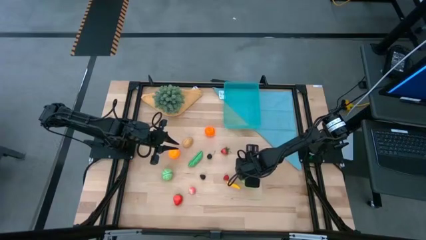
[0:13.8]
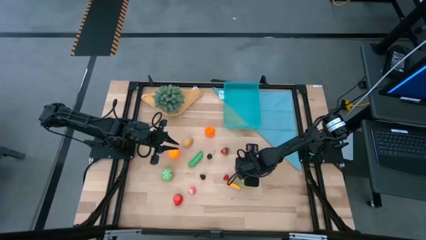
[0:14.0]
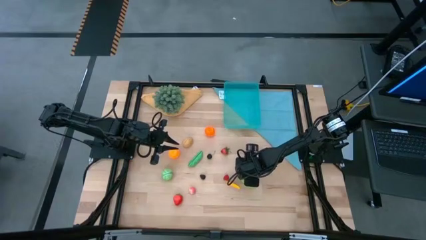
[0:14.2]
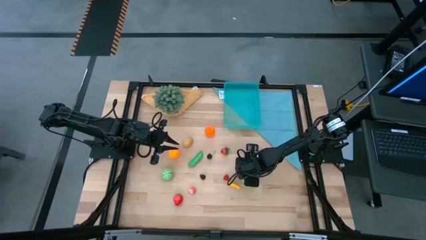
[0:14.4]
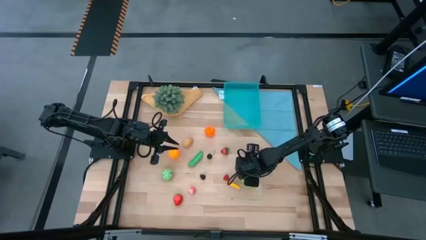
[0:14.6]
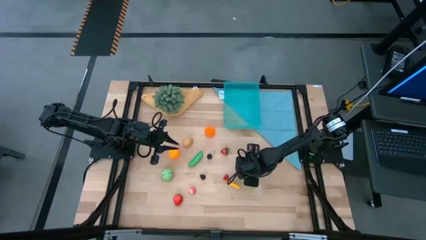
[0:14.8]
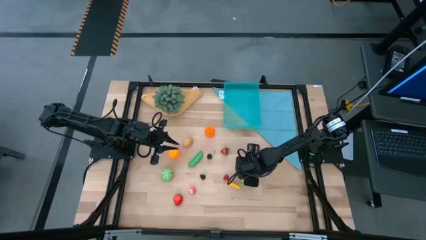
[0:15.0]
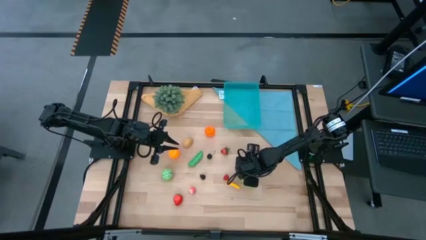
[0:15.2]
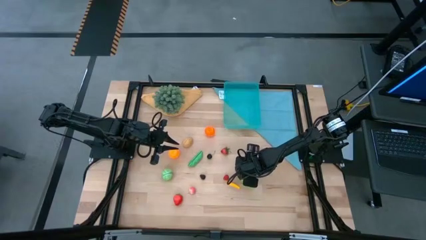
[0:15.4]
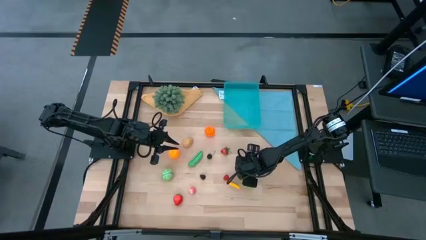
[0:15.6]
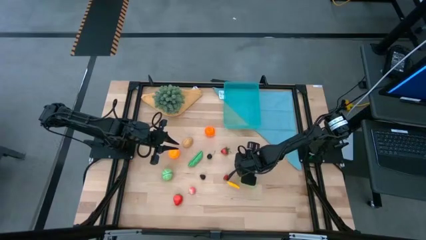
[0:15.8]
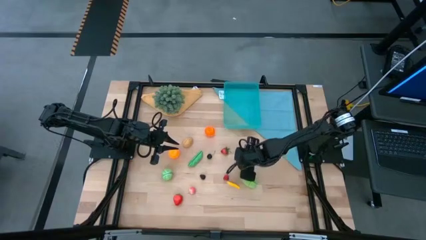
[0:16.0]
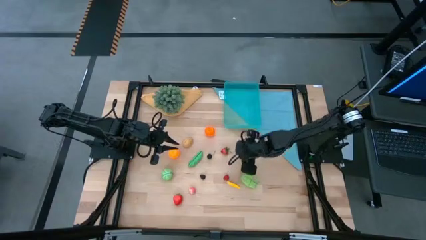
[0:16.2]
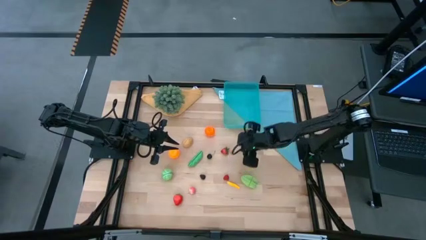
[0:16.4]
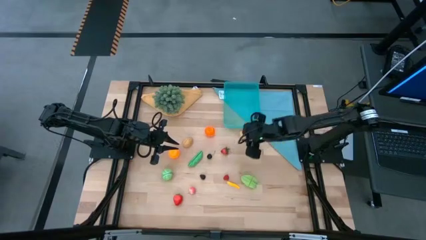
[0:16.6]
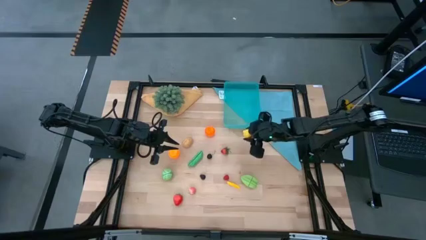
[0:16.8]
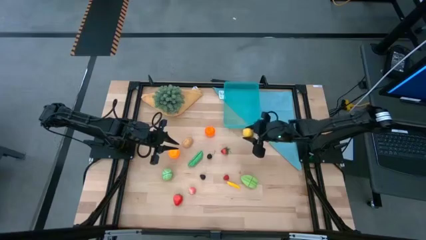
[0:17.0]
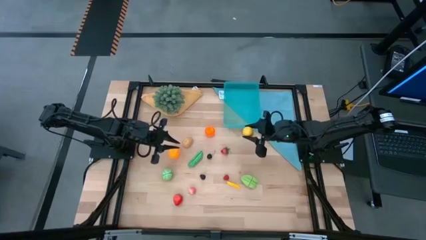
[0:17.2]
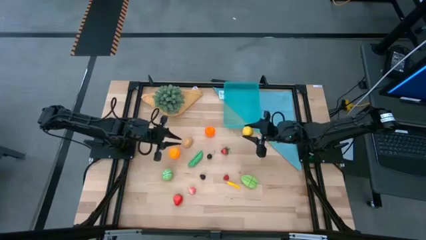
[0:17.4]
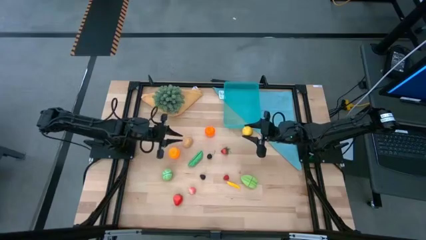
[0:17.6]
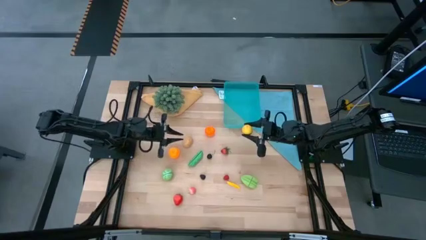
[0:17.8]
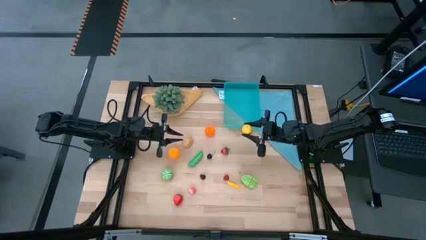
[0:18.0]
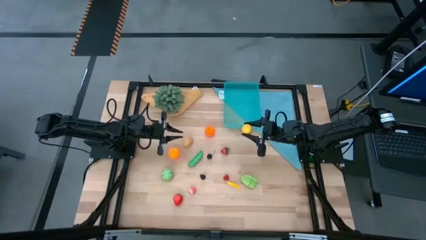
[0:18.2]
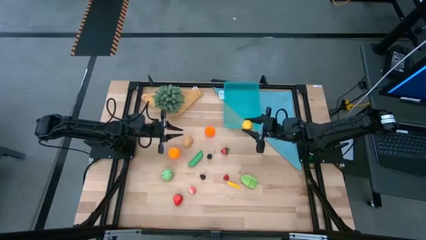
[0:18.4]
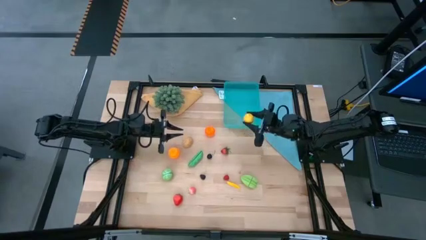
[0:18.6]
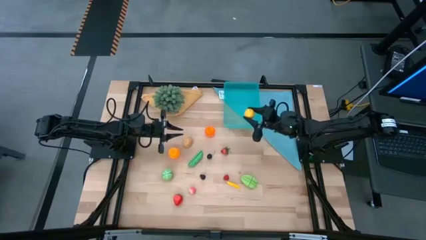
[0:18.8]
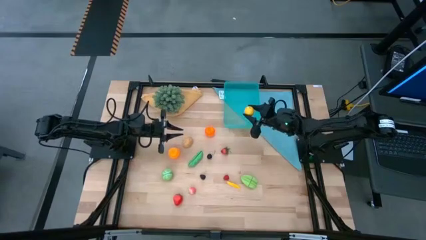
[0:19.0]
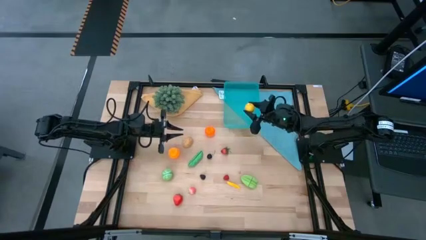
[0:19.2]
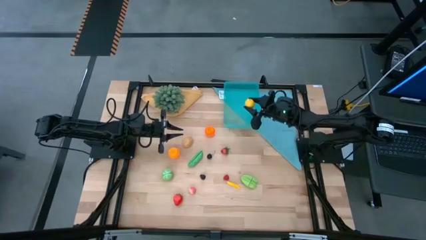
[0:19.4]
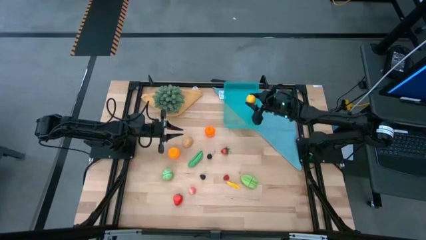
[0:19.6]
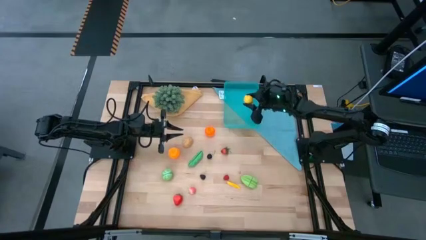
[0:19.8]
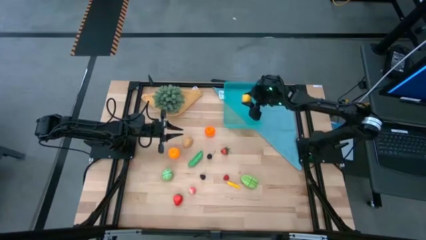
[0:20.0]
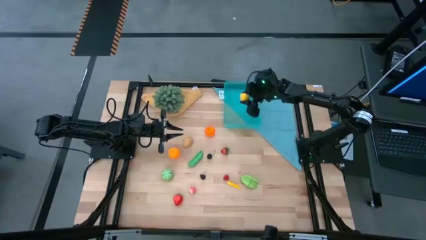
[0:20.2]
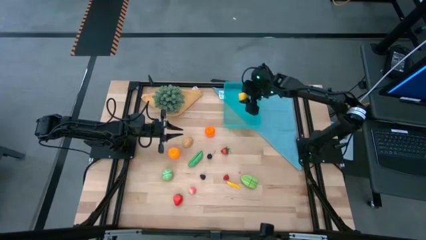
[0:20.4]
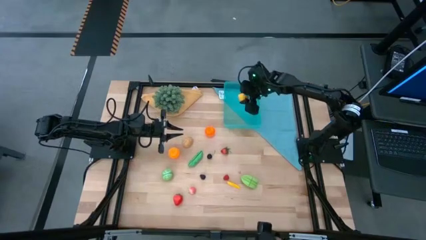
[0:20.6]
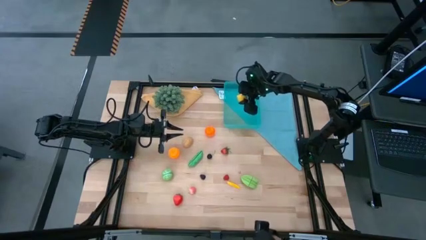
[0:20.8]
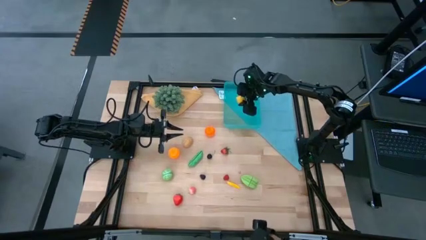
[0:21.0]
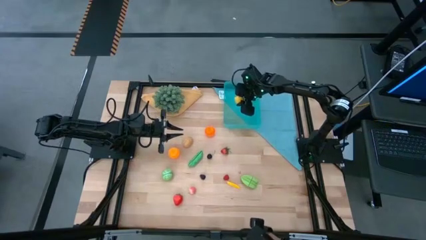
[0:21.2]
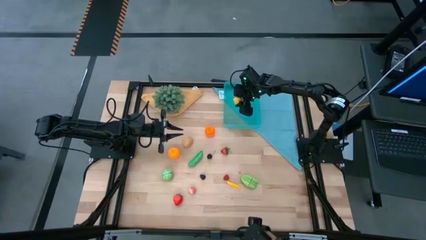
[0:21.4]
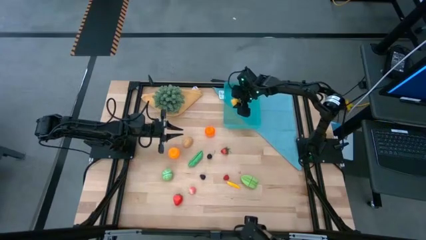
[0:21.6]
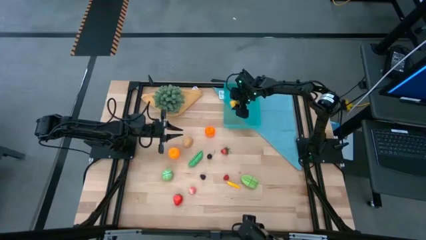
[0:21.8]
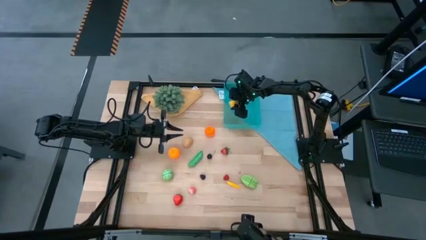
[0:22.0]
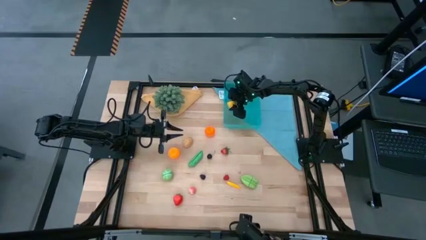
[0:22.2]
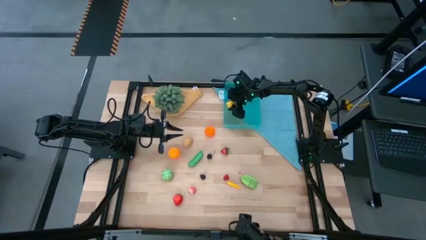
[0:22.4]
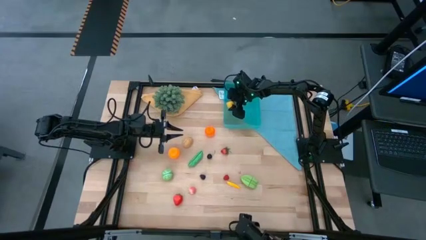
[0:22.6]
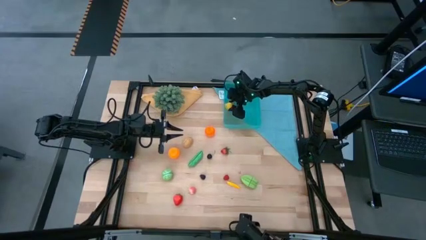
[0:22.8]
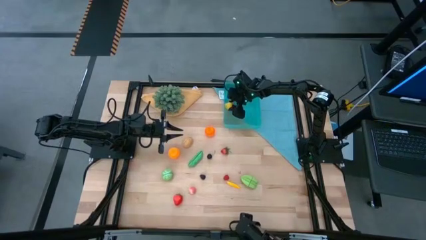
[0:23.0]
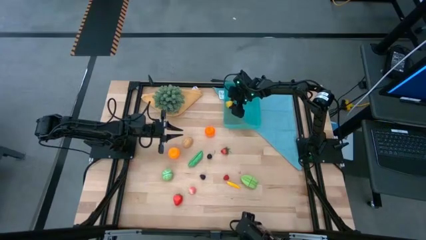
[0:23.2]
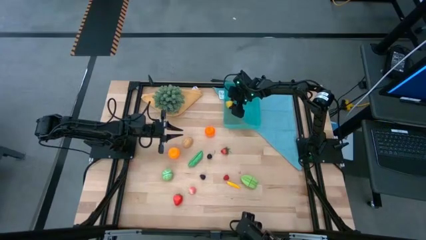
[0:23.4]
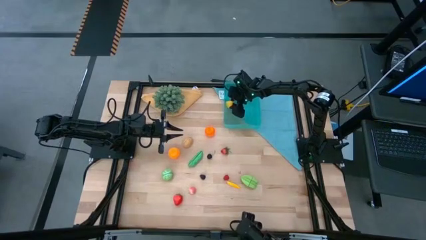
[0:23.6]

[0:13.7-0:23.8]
Task: Pick and placing Produce into tupperware
Put the yellow lemon into the blue bin

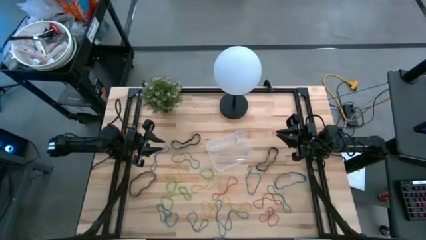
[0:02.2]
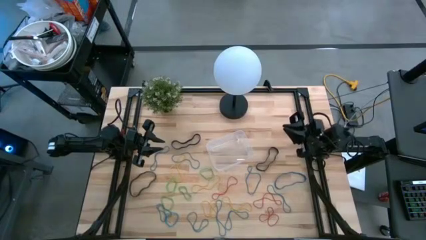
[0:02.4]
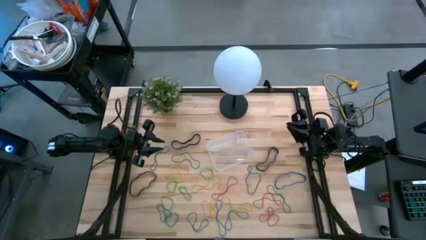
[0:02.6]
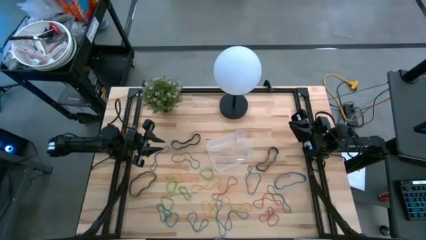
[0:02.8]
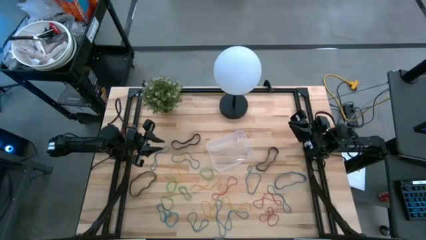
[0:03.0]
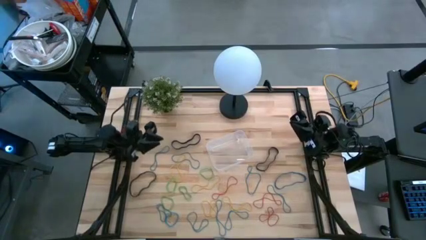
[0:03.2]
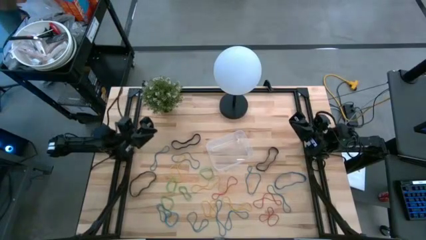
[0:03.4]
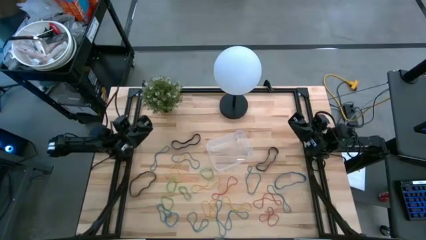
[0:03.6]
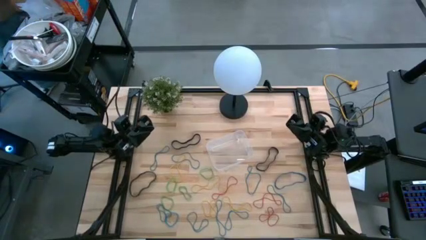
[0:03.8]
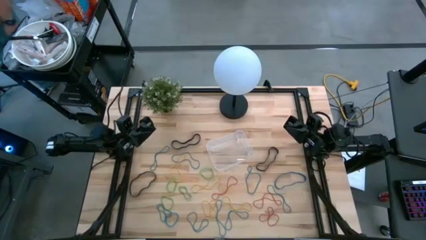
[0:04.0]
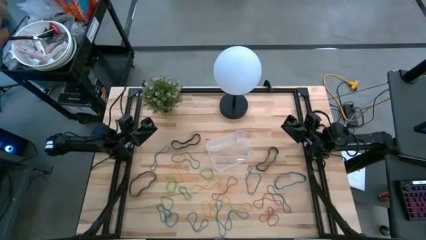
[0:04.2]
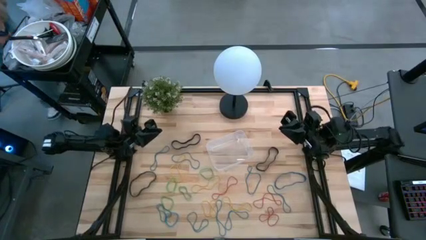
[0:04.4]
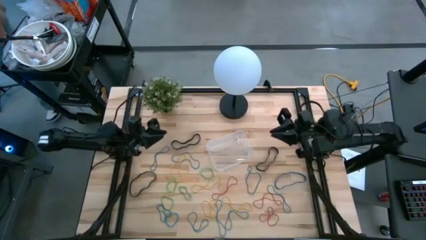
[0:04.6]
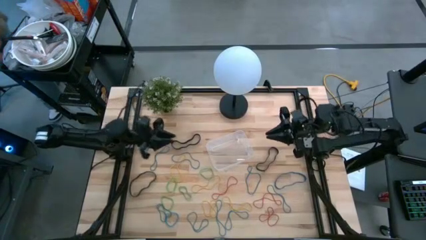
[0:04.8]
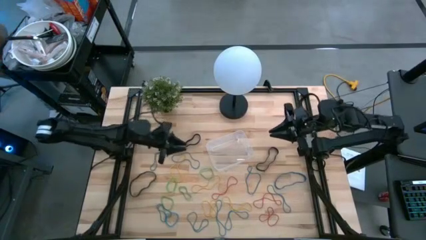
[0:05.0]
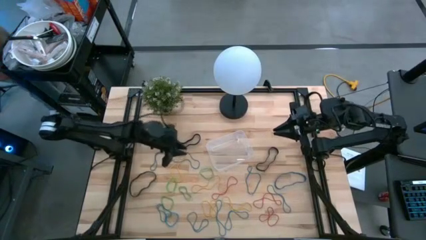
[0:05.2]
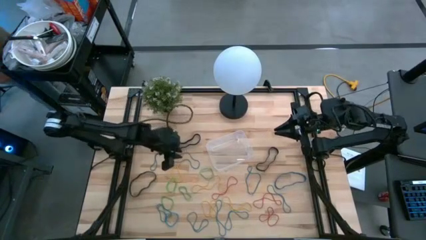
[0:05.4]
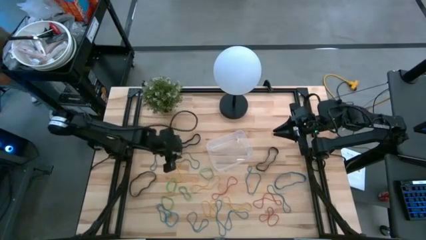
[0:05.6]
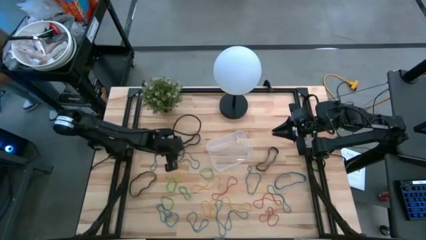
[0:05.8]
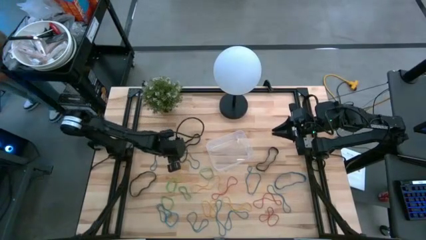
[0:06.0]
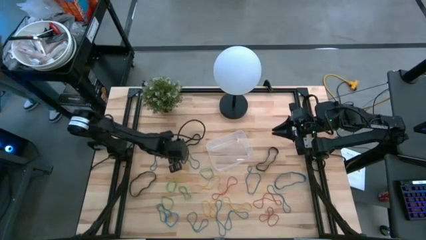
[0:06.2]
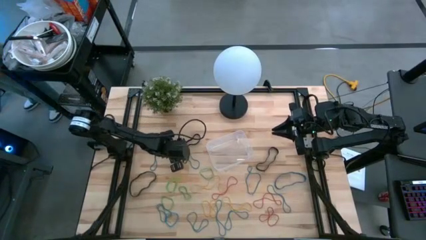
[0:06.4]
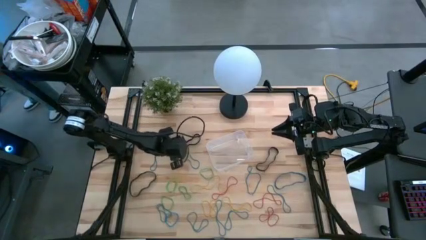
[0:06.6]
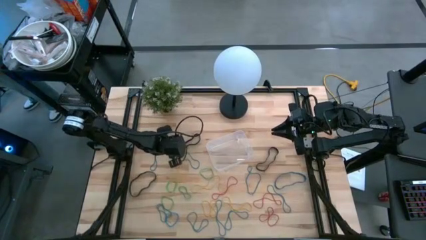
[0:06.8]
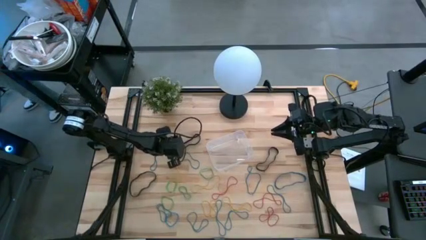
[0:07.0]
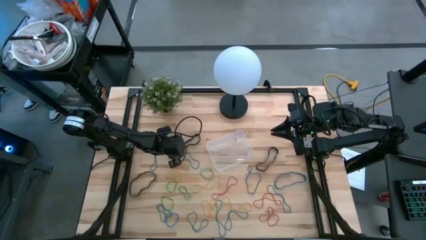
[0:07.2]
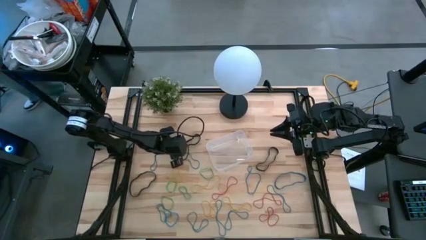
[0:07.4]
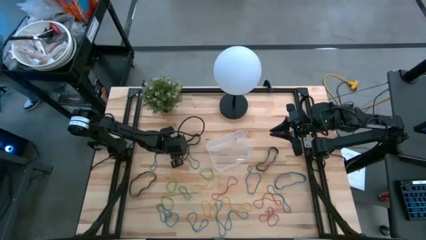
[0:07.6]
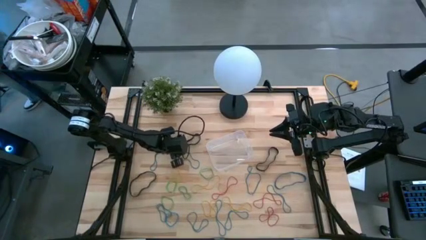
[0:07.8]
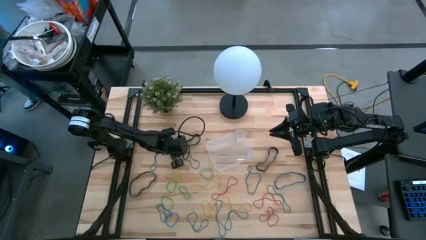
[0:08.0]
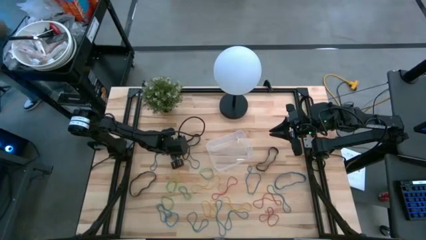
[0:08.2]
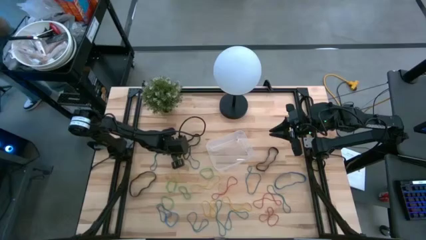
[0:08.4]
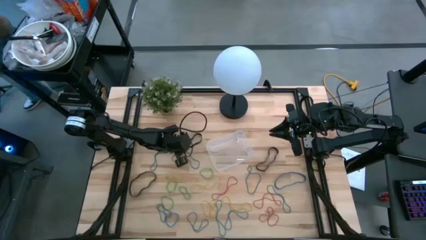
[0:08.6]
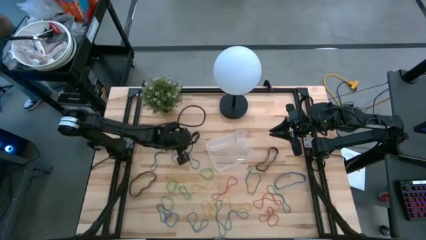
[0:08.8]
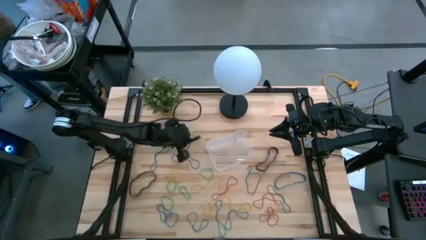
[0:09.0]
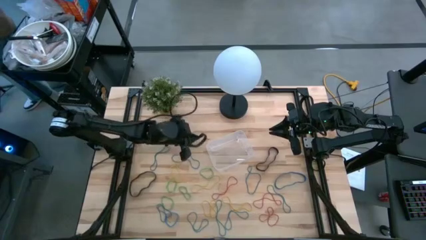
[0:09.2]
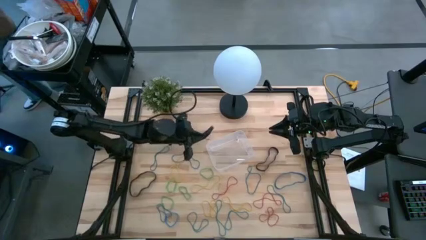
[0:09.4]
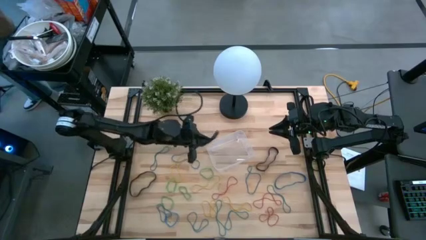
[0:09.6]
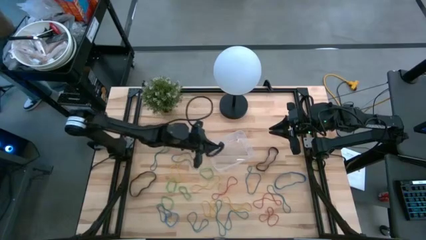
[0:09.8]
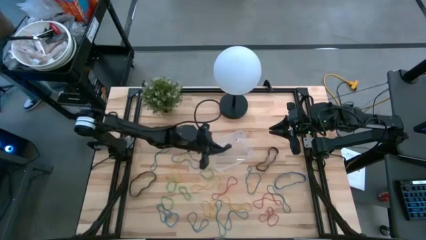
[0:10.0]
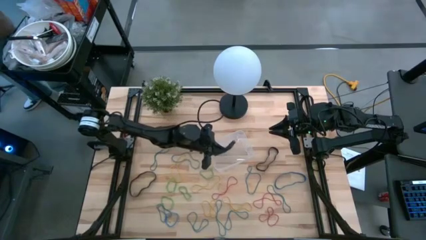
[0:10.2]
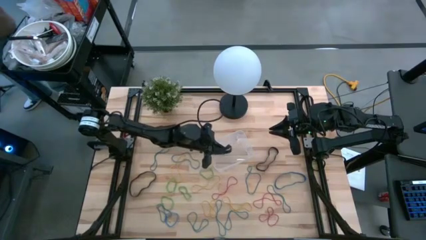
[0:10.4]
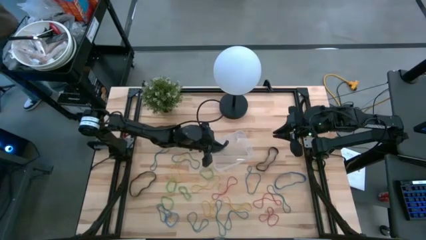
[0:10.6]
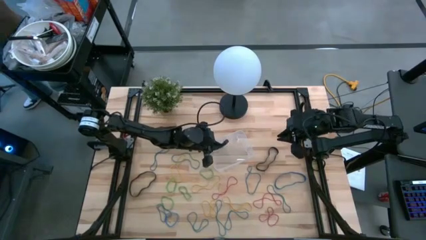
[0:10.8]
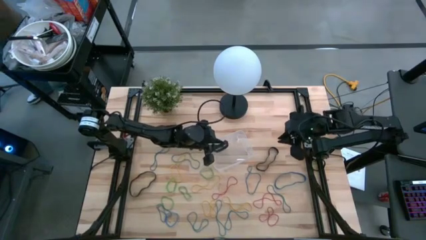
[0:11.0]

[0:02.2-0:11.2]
Task: Pick and place rubber bands into bin
Put the black rubber band into the transparent bin
